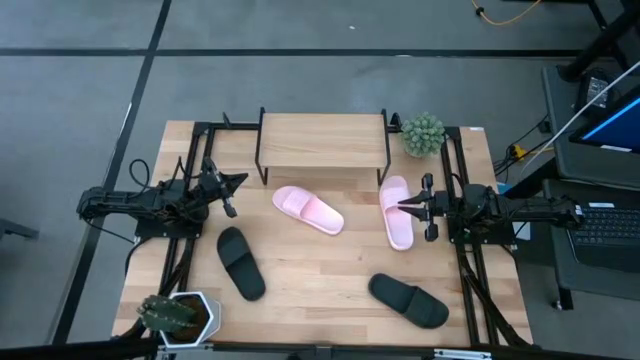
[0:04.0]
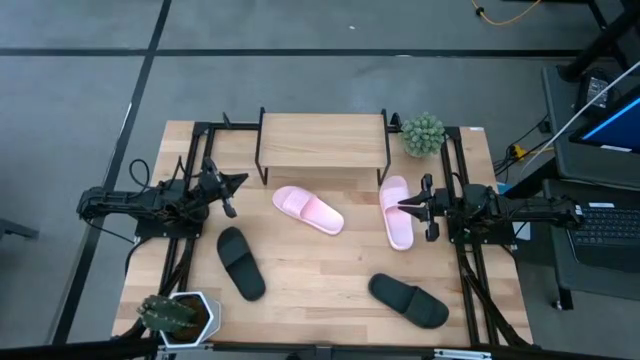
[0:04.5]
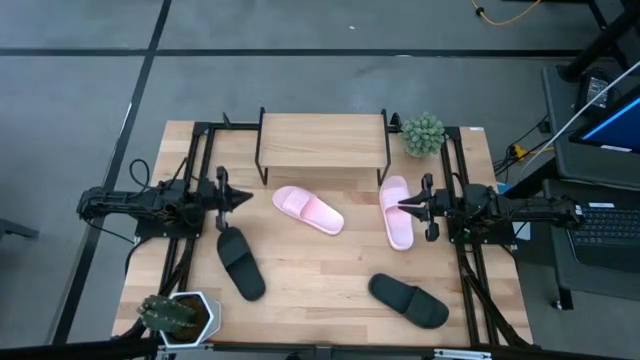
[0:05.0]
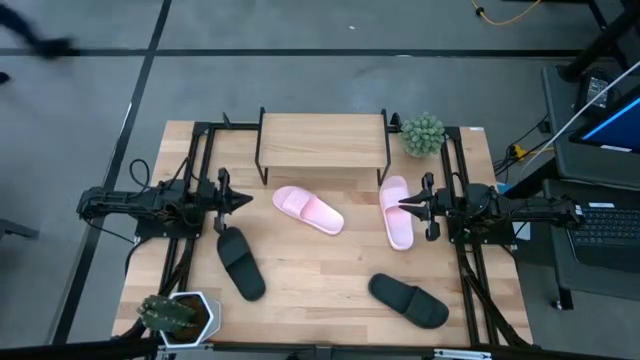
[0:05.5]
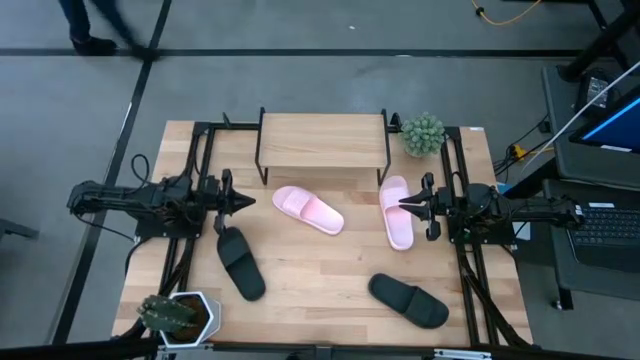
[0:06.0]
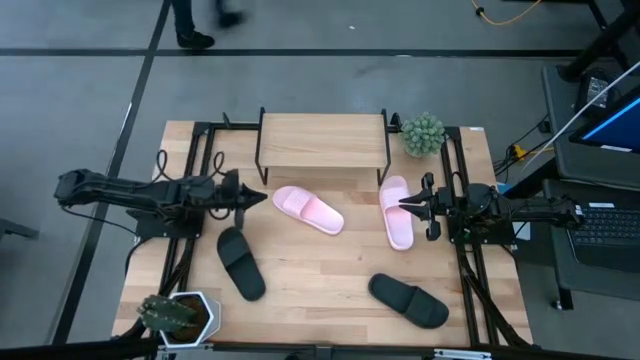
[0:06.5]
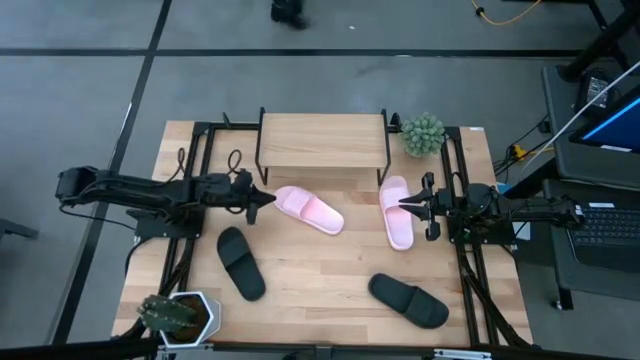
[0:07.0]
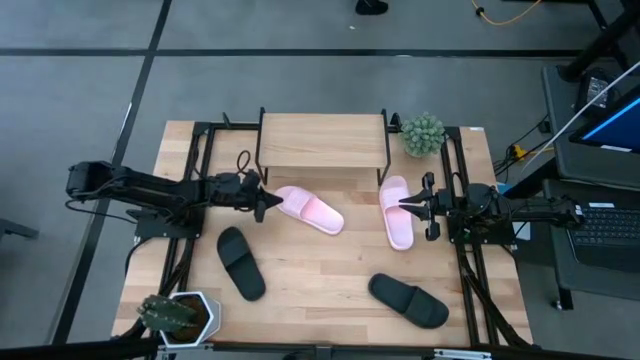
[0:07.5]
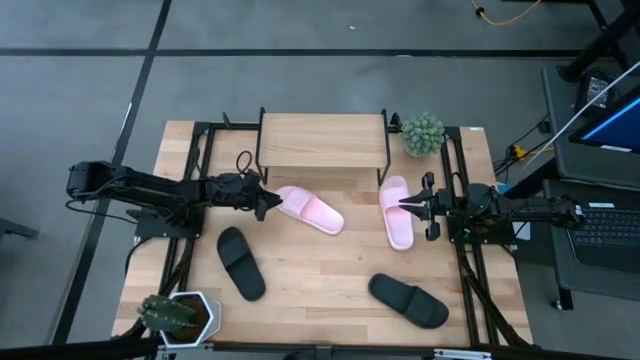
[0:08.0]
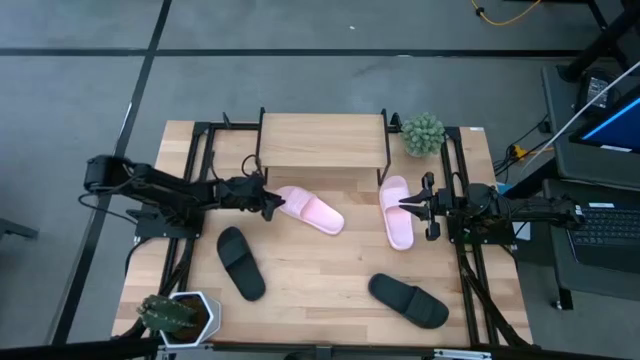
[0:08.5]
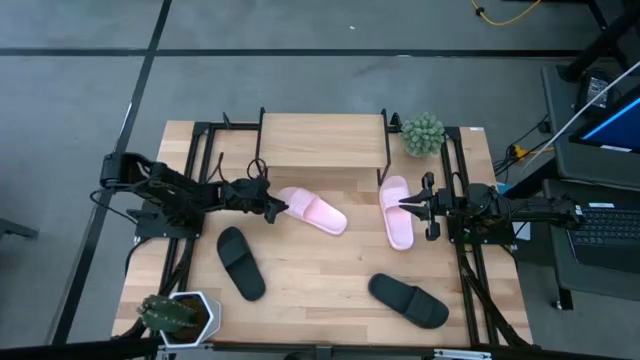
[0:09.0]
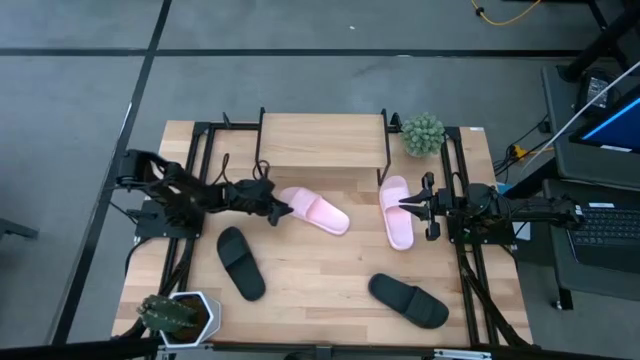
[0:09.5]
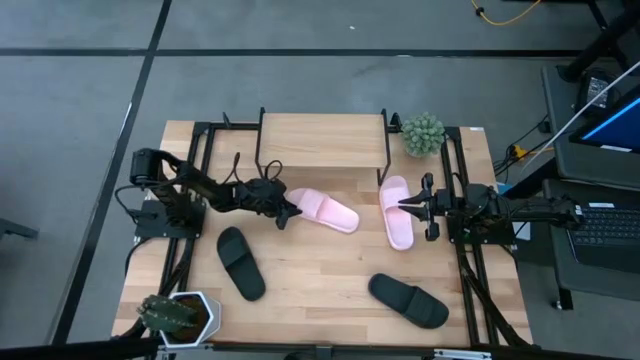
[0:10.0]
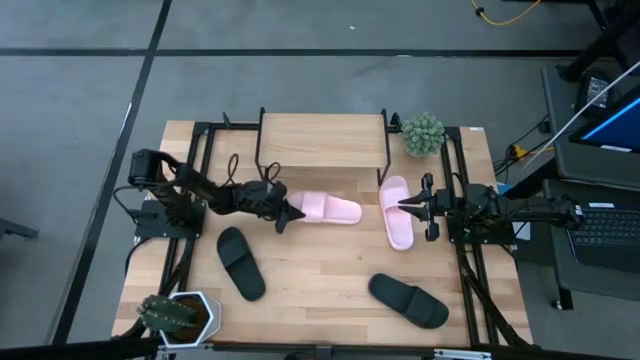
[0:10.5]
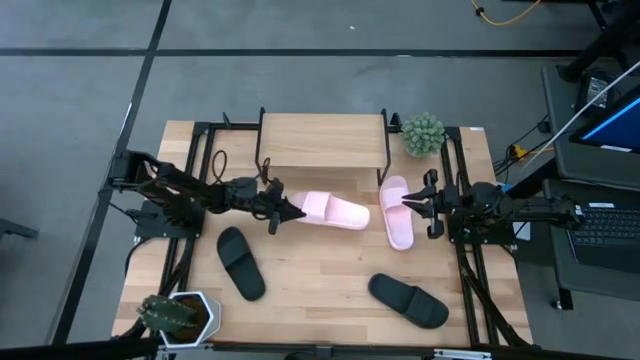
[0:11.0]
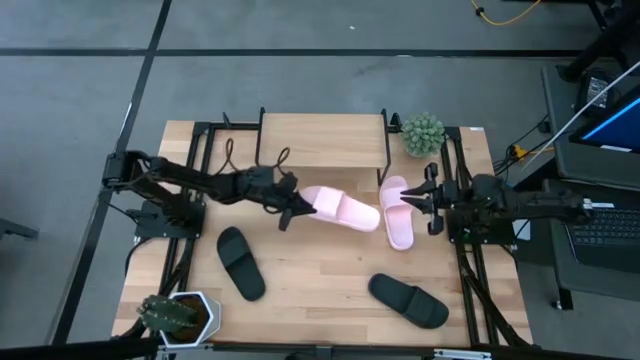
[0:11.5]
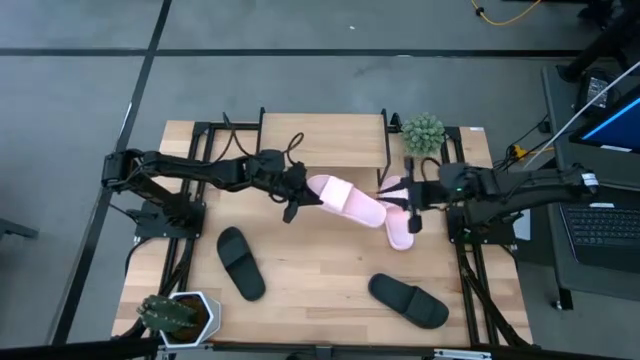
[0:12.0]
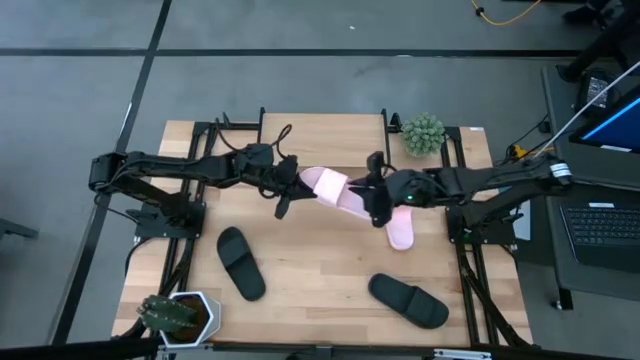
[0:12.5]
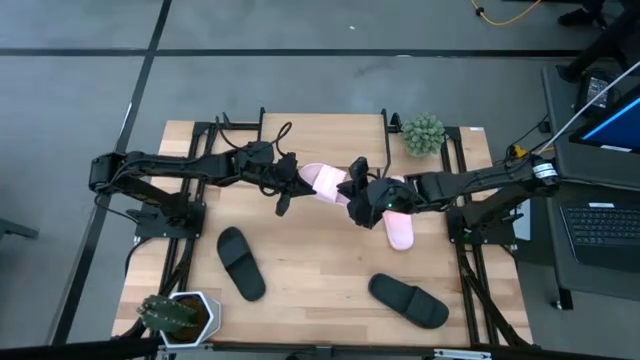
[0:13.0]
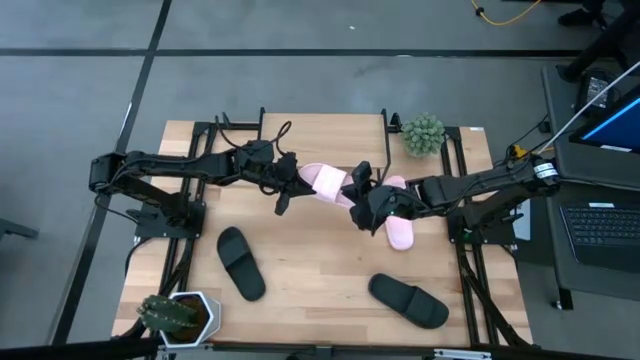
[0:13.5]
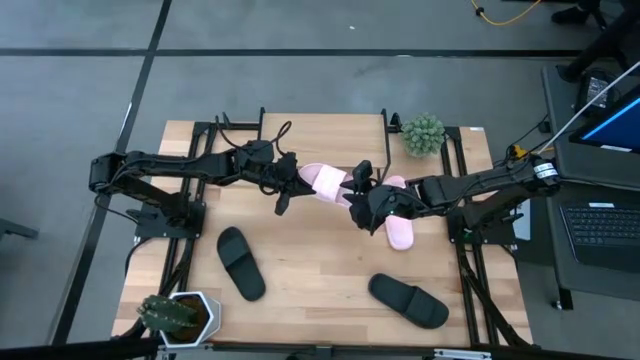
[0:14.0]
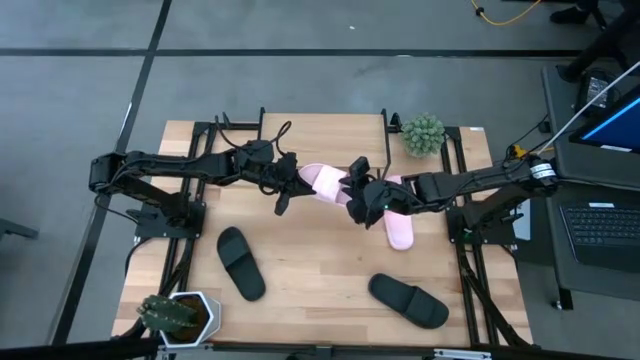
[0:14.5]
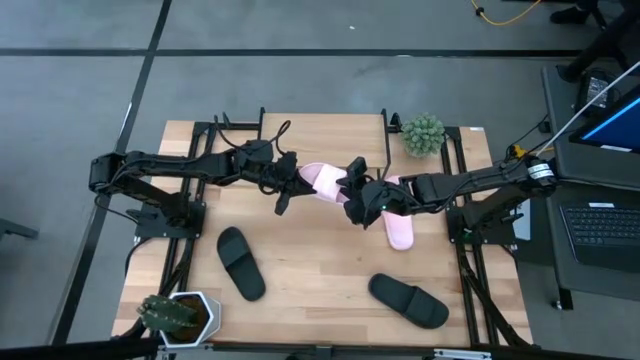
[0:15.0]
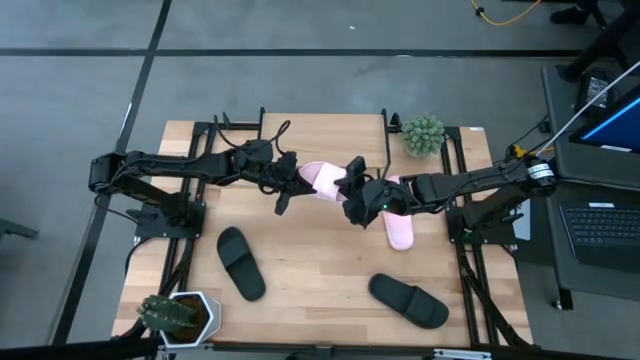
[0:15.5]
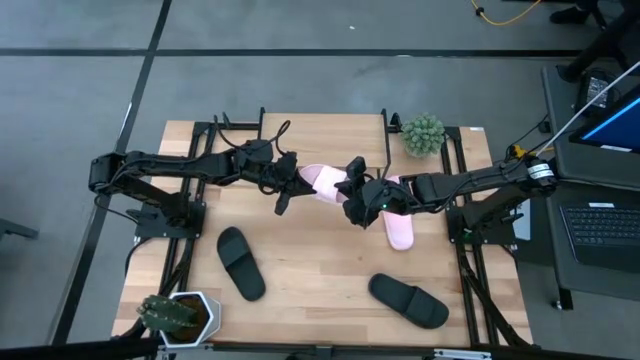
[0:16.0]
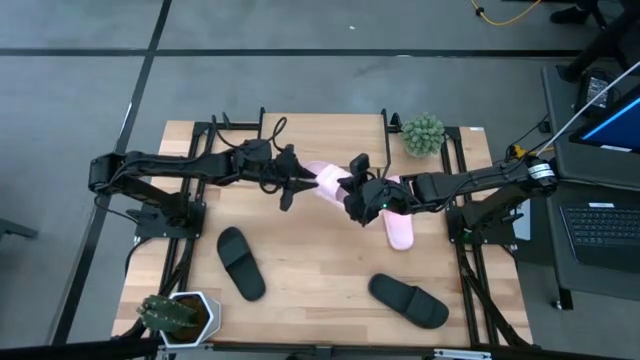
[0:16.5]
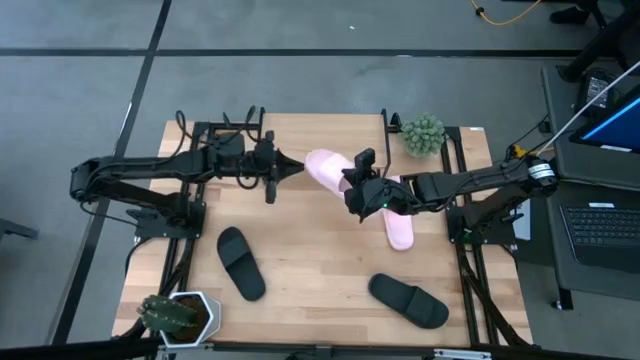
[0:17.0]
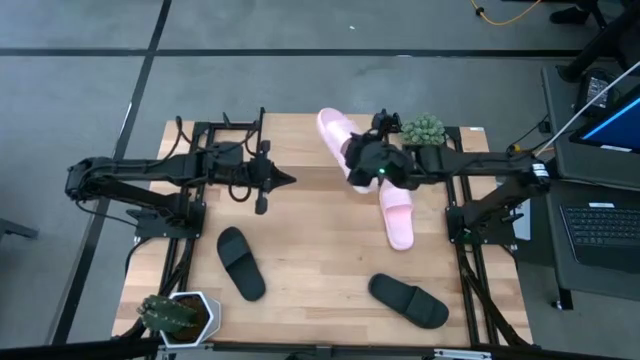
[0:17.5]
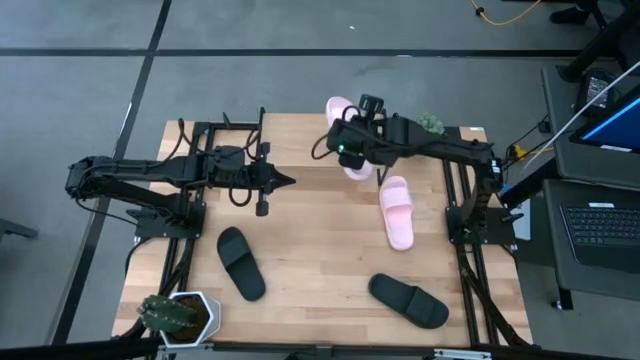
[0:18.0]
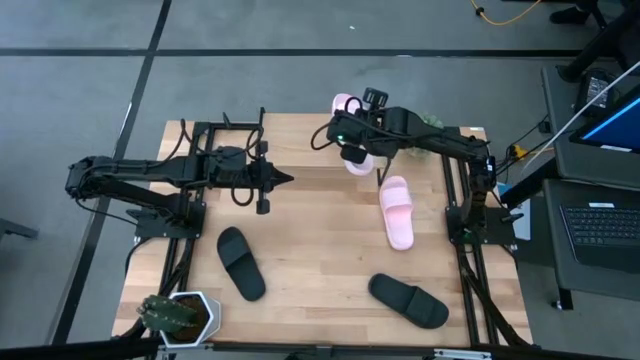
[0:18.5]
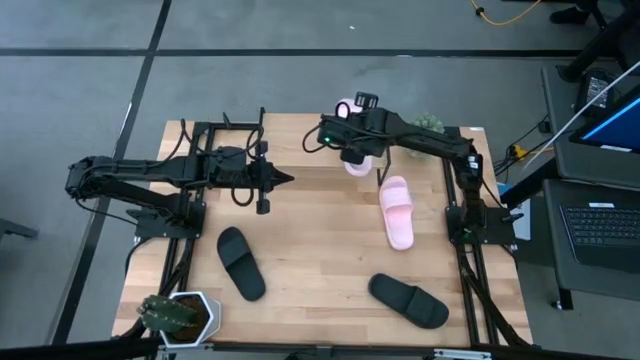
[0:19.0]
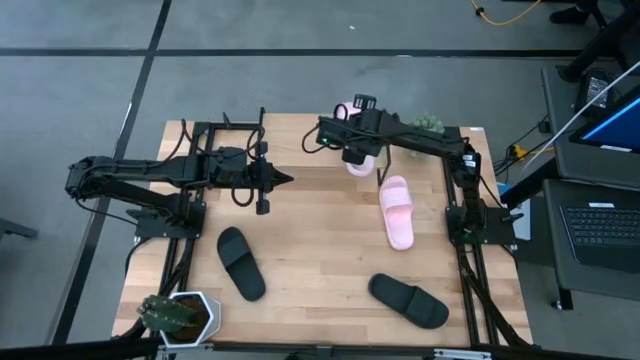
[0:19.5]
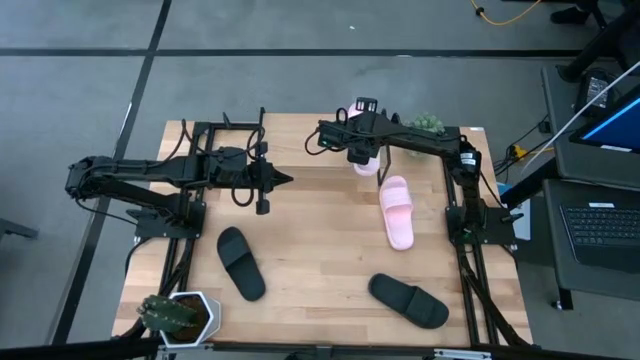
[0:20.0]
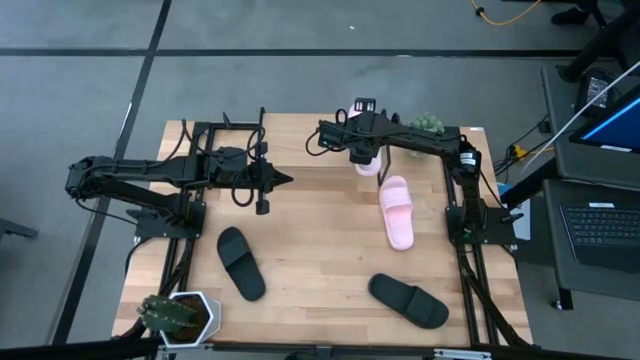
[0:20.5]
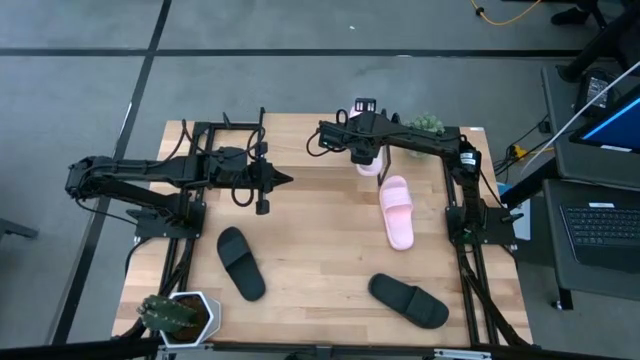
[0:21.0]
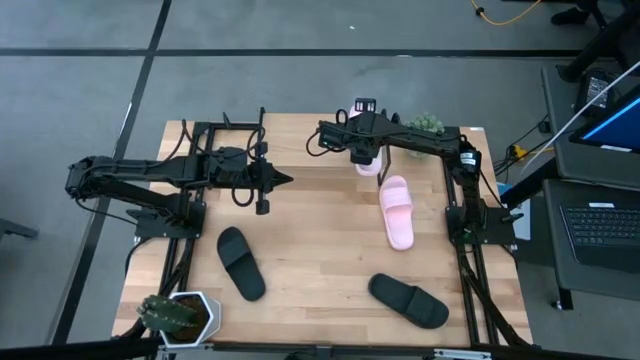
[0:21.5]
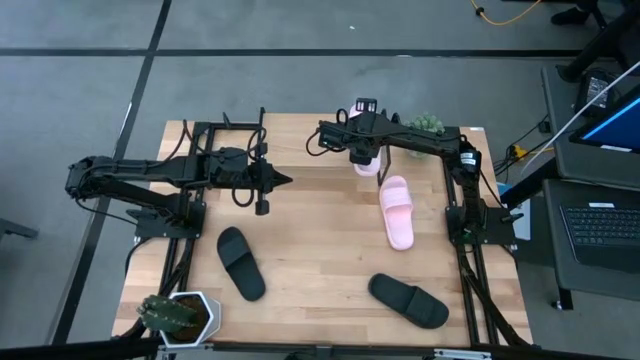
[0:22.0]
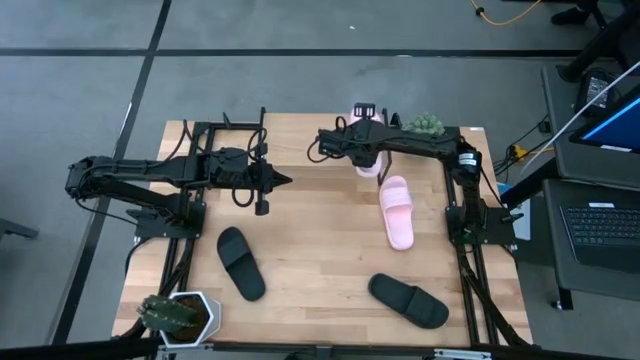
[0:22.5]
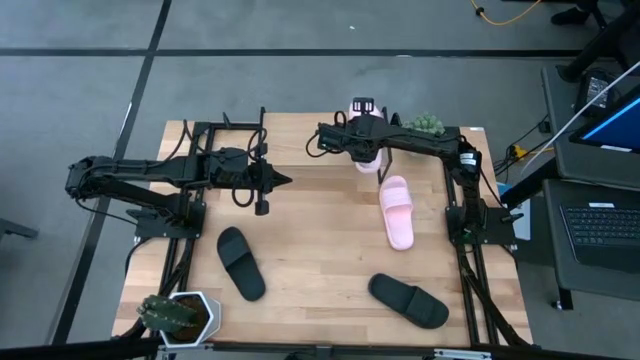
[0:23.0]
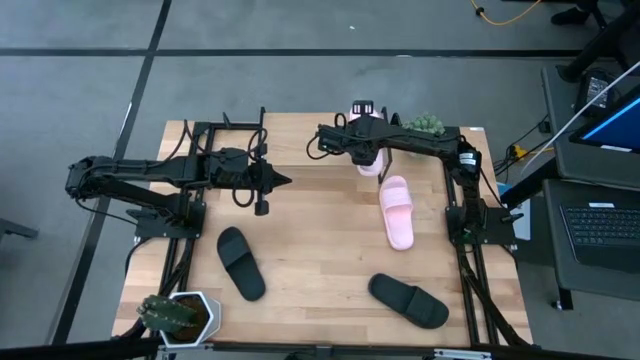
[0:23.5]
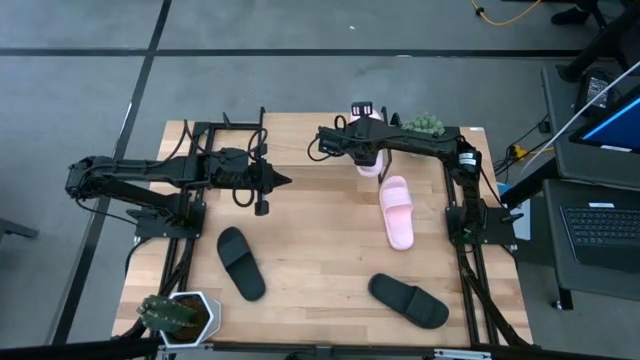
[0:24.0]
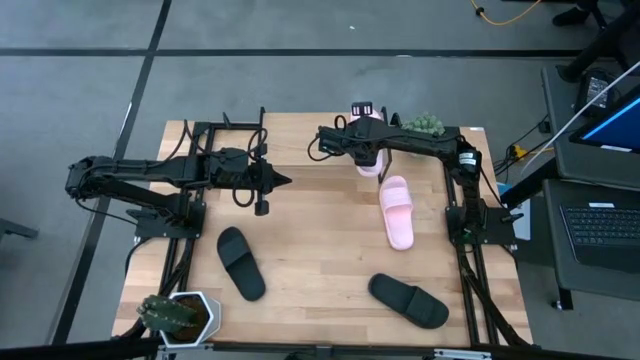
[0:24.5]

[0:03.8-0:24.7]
Task: Pick and place slides into the shelf
Put the left pink slide on the shelf
